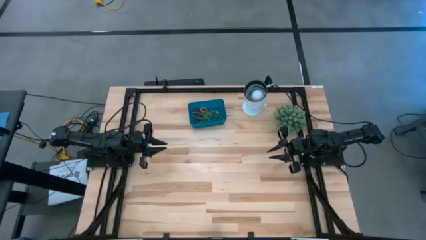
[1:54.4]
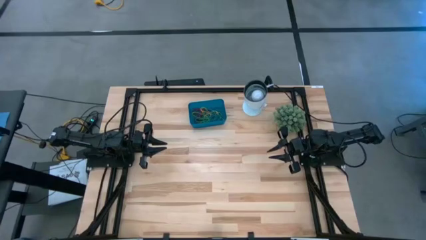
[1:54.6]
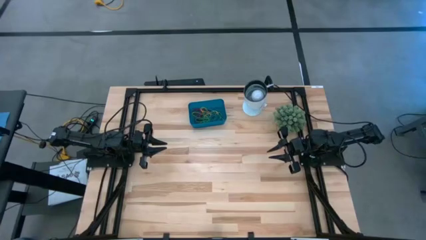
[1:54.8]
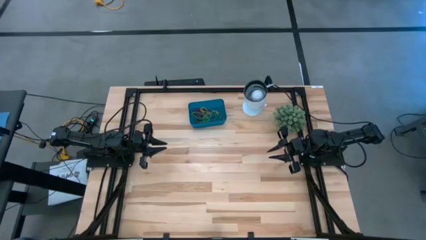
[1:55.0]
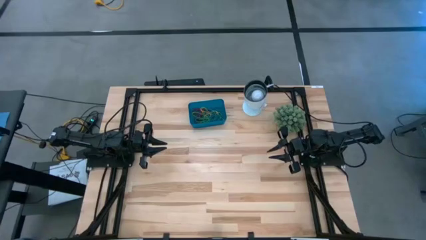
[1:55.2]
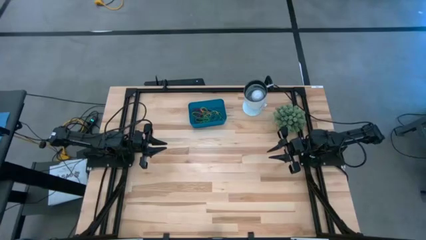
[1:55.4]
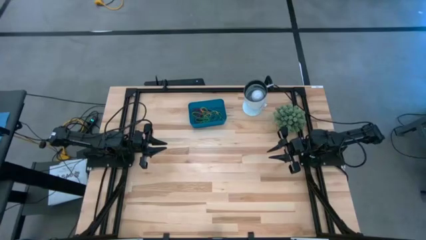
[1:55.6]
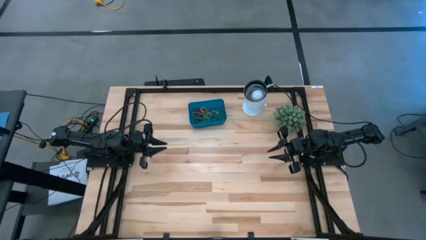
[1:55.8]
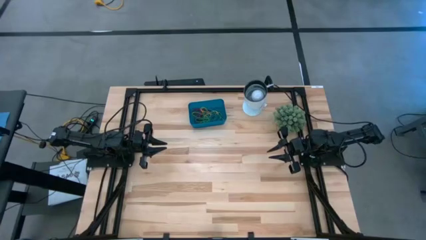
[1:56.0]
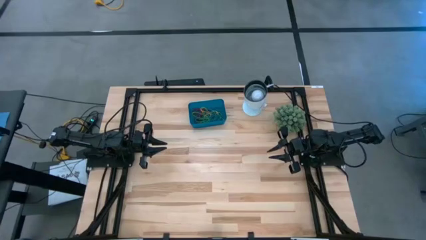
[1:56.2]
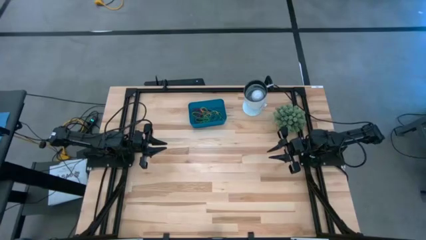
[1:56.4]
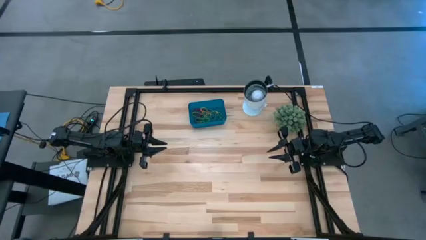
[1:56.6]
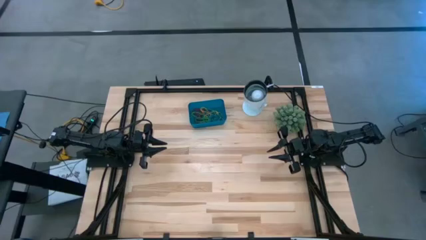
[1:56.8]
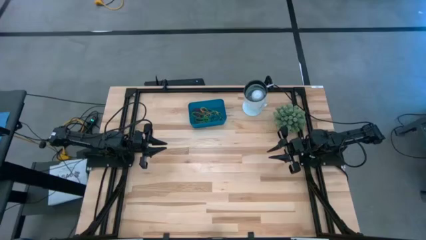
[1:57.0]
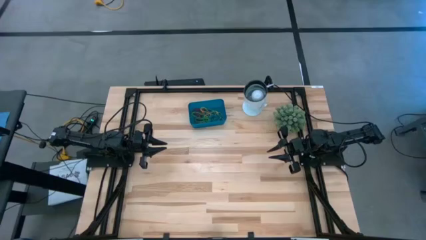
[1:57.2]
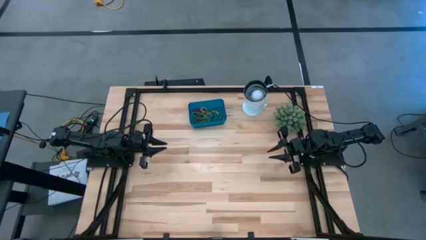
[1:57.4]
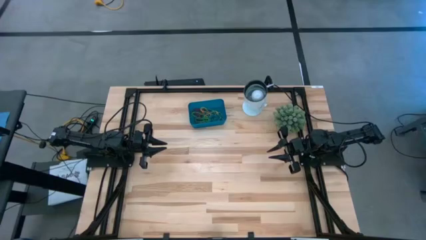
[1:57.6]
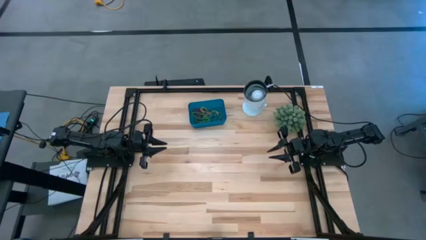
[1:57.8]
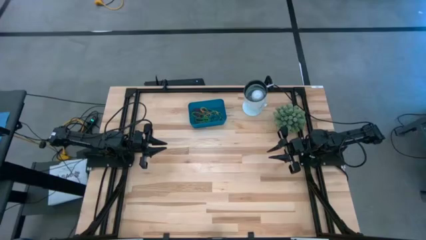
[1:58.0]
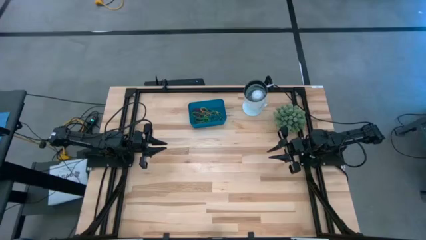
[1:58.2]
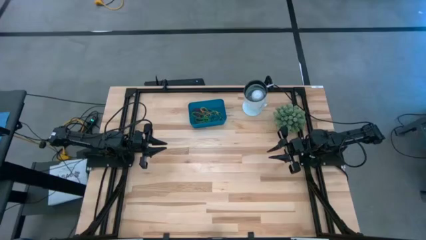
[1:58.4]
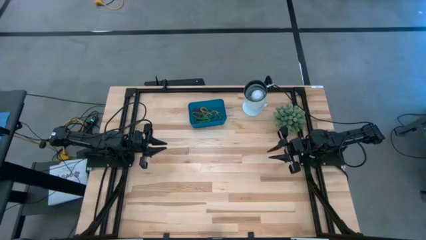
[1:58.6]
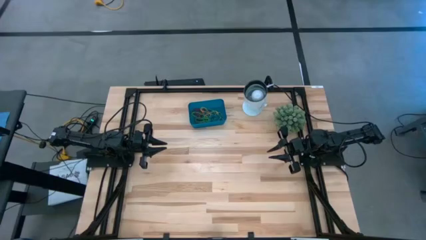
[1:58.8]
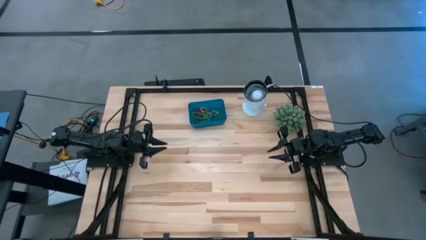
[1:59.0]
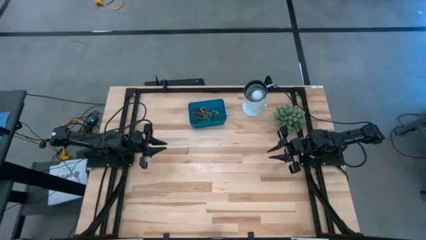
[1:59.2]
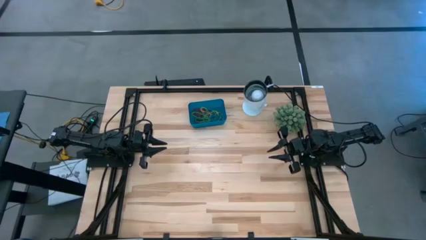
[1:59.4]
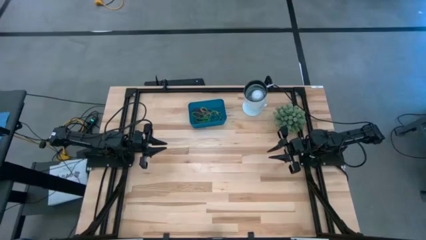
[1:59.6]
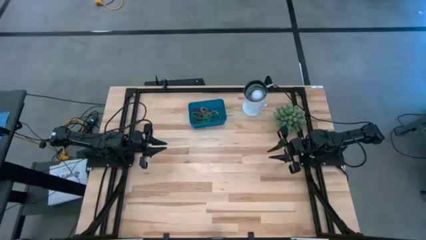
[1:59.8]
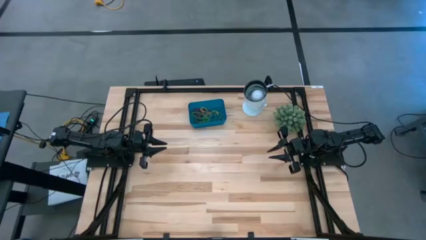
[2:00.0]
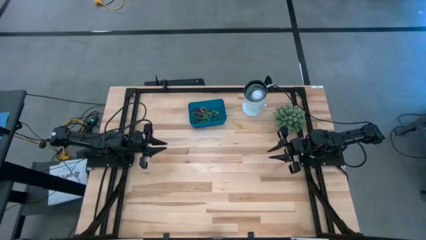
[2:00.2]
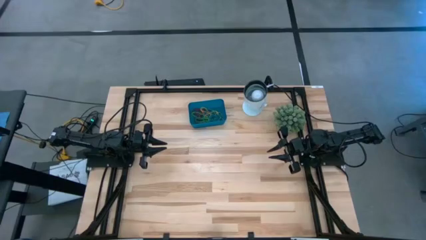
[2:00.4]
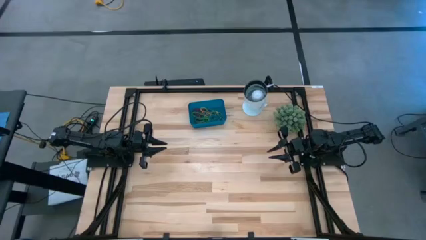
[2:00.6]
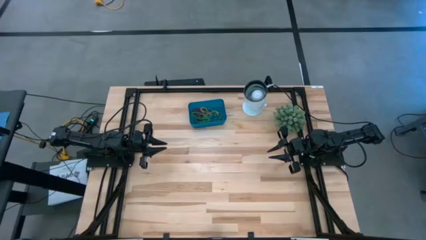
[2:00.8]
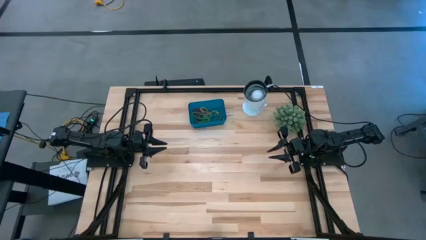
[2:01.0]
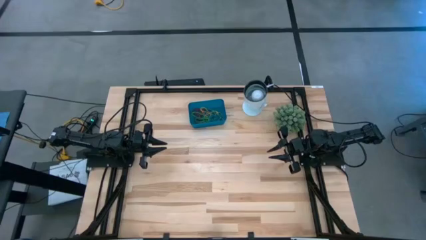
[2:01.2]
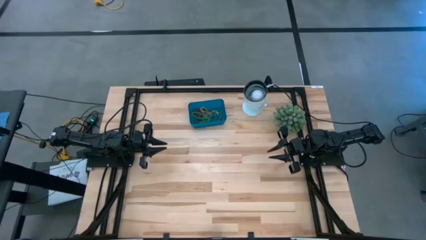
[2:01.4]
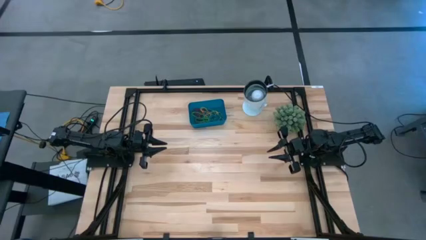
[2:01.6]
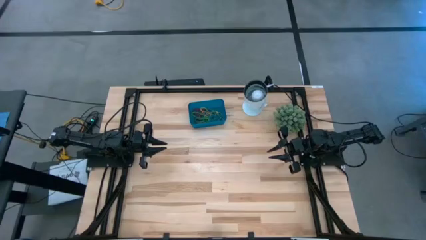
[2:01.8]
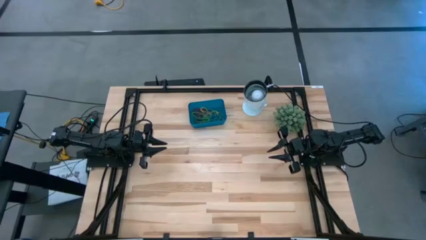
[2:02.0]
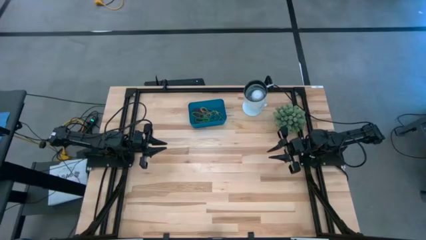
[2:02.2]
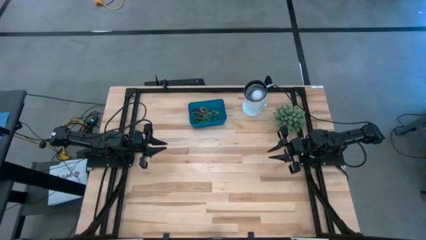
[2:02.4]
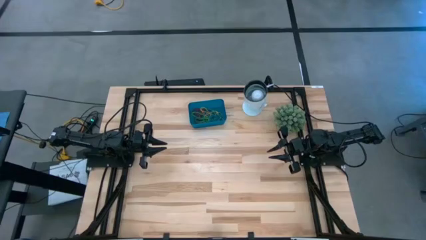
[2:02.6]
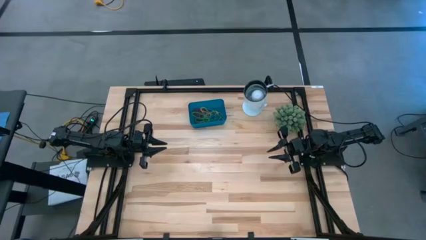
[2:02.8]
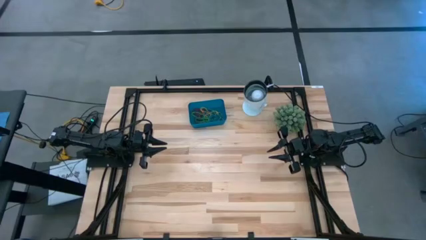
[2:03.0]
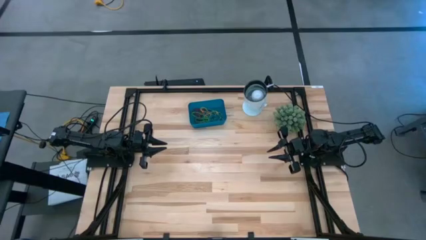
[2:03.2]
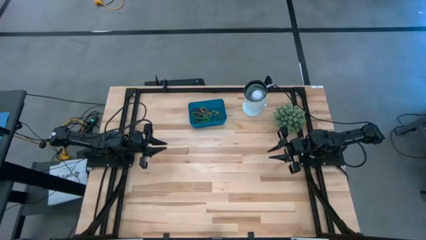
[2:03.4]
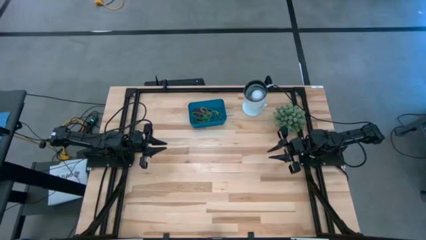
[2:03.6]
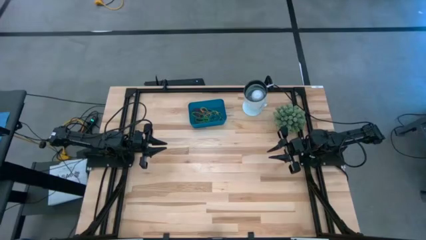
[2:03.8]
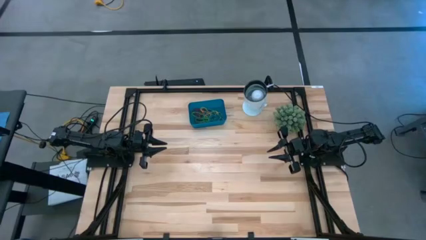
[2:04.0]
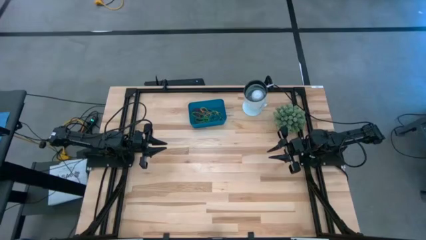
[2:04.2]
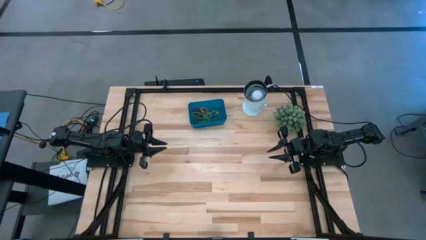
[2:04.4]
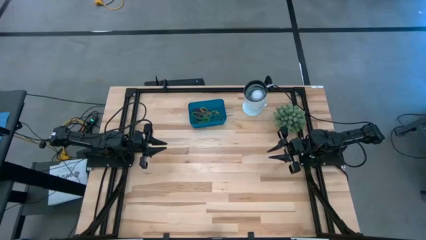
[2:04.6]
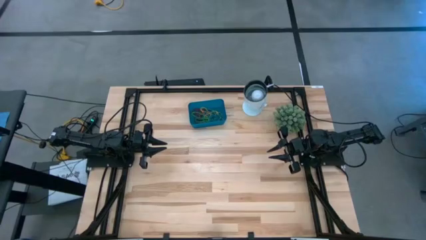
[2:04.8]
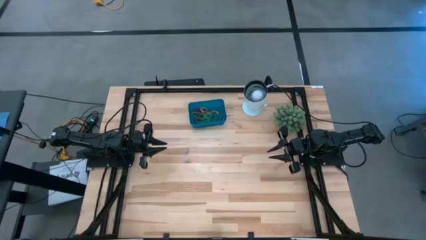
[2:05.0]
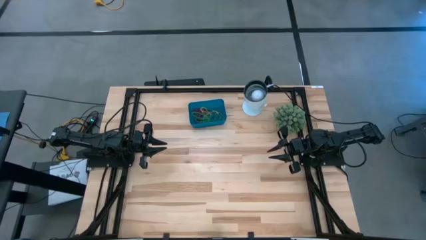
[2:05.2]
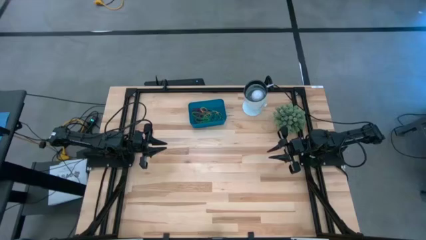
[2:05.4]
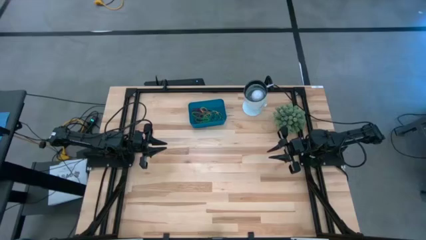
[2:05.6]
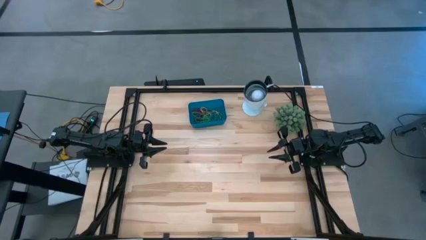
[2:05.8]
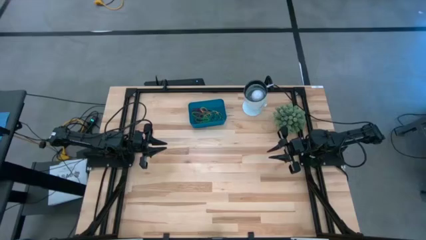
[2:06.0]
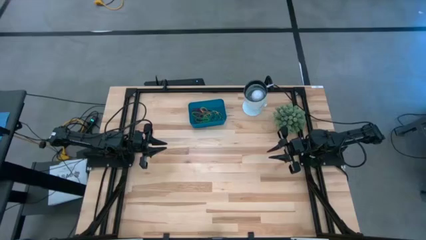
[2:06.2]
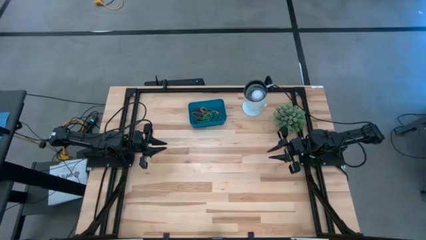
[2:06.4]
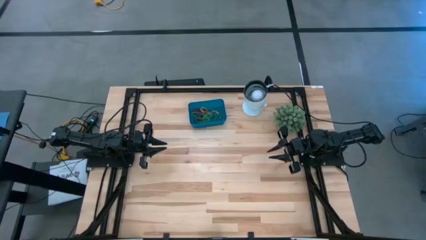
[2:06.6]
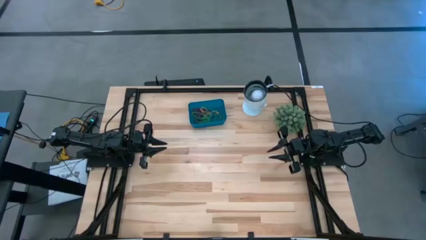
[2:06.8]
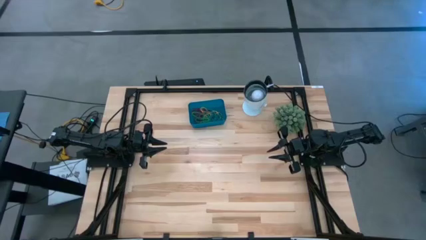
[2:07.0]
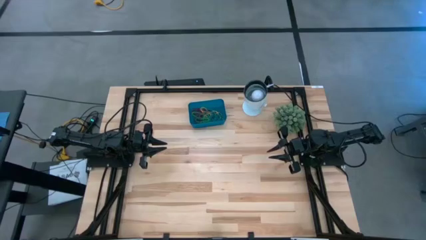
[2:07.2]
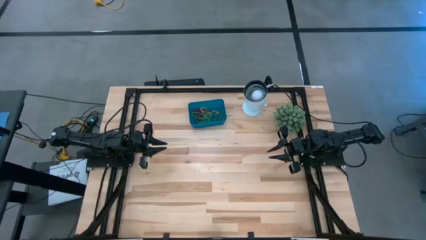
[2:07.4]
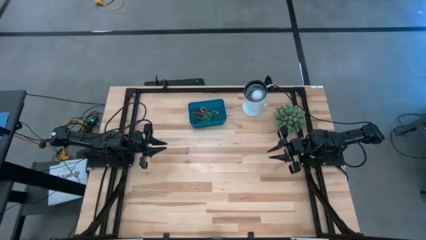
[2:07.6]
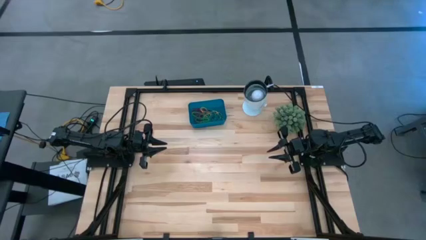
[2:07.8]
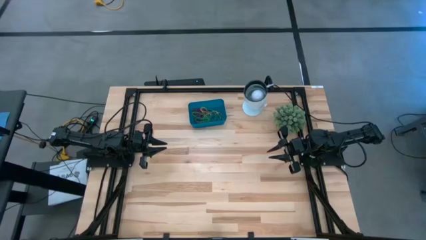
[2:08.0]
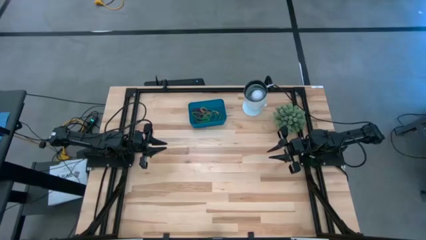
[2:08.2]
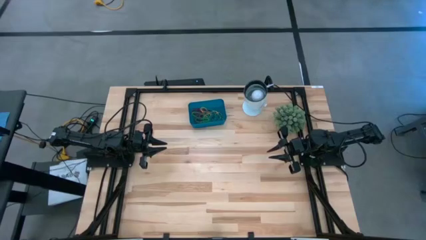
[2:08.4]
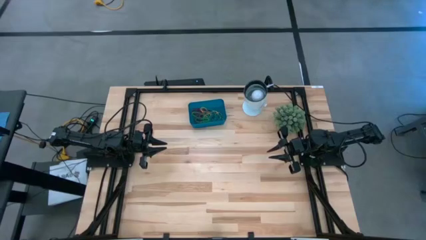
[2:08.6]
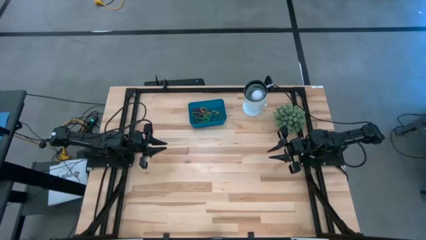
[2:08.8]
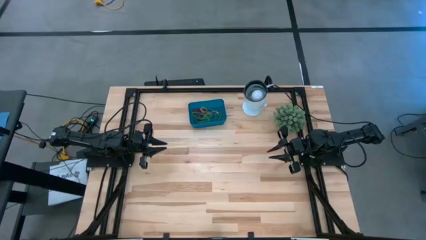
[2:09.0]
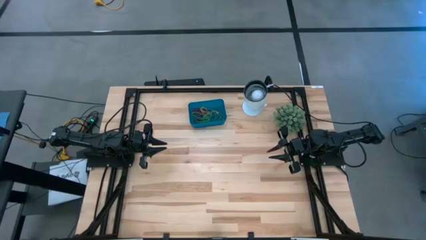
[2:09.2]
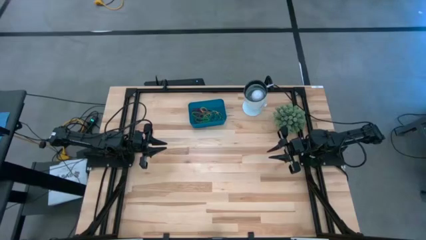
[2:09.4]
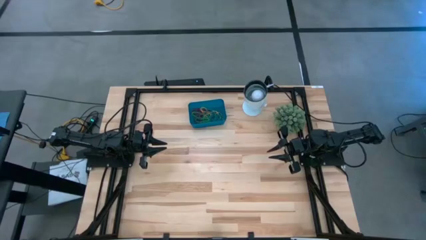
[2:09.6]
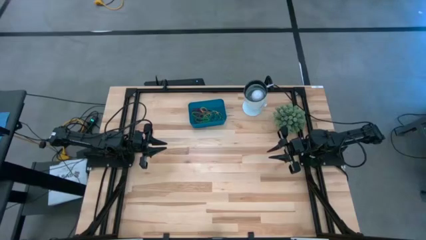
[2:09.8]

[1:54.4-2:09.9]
Task: Pick and place items into bin
Return to Home Position
